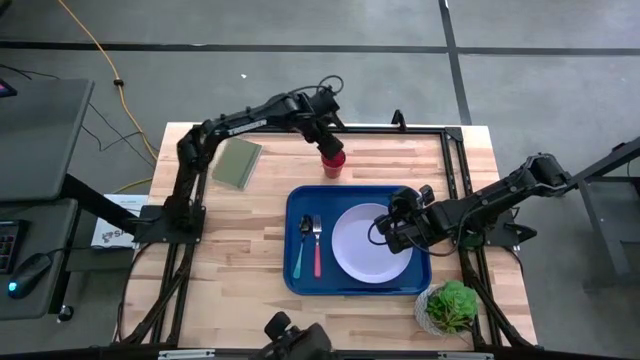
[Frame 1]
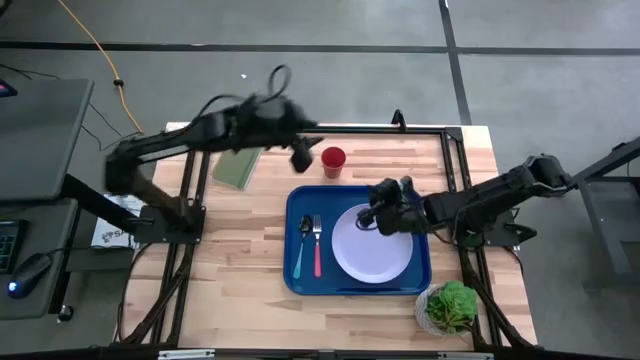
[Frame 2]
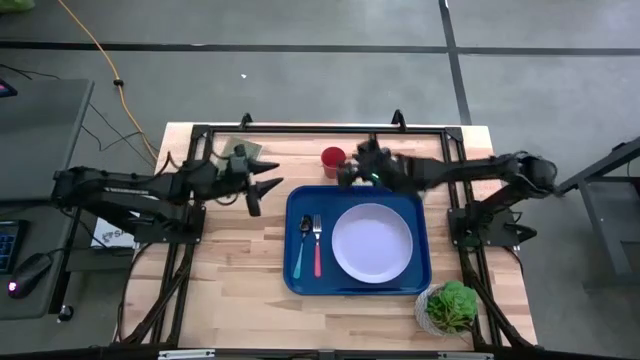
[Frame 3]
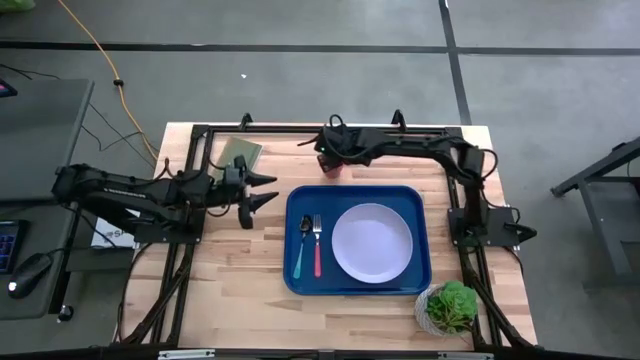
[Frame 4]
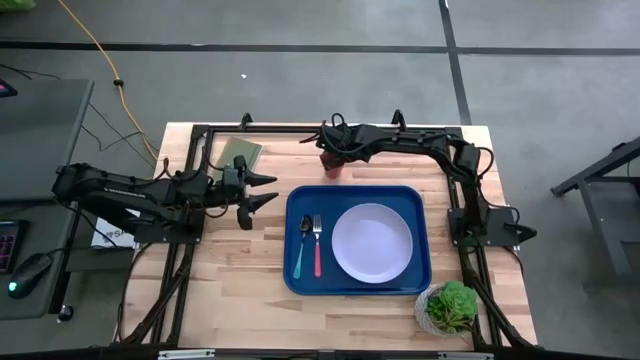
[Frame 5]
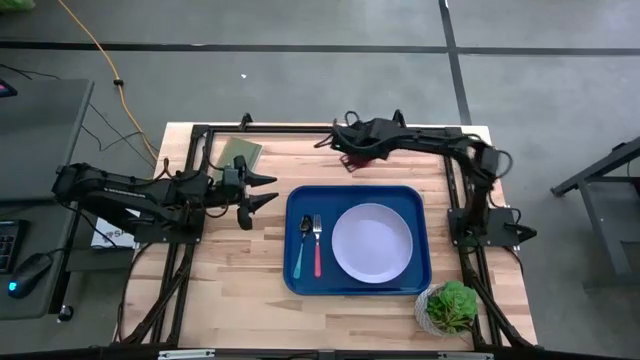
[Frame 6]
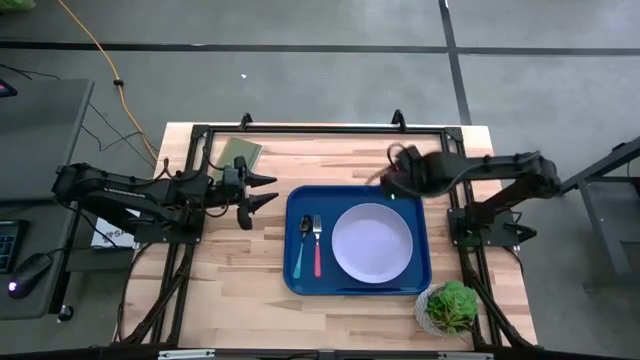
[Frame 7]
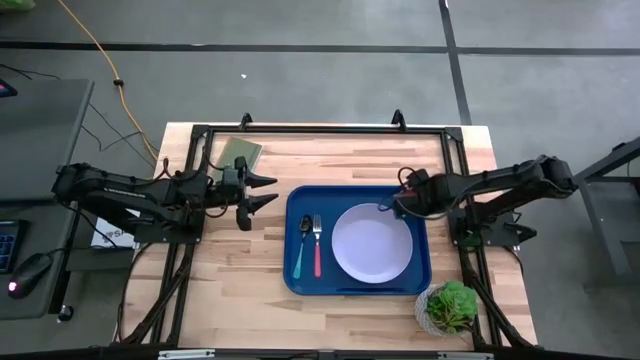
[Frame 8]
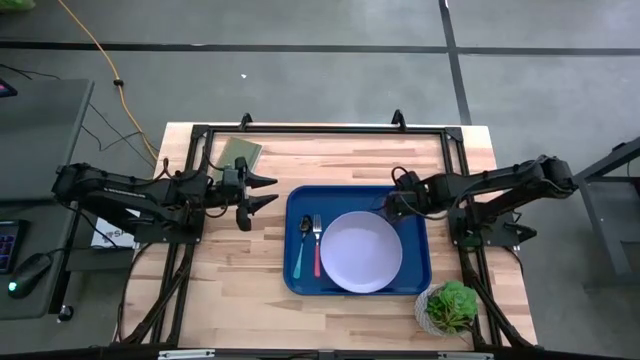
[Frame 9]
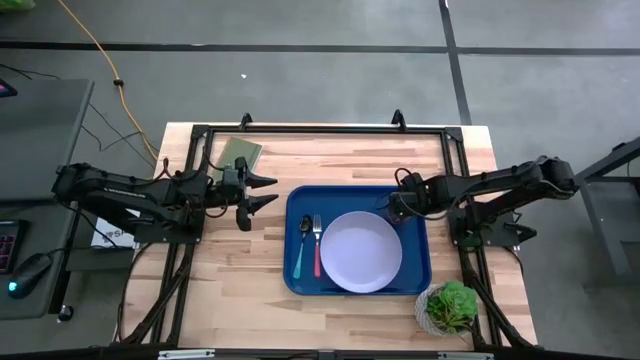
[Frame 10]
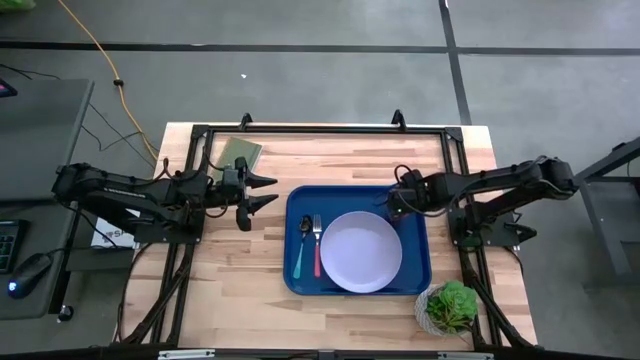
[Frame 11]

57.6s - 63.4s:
Task: Pick and place plate/cup/fork/spoon on tray
Put the orange cup on the blue tray

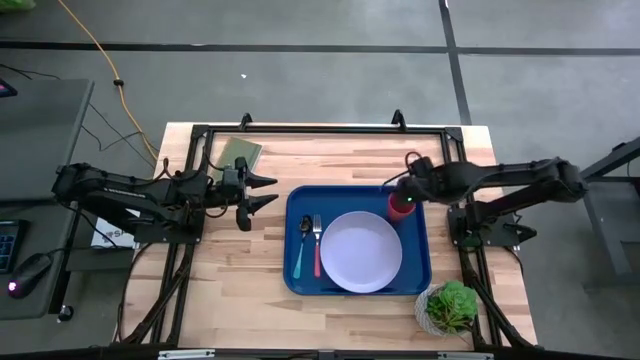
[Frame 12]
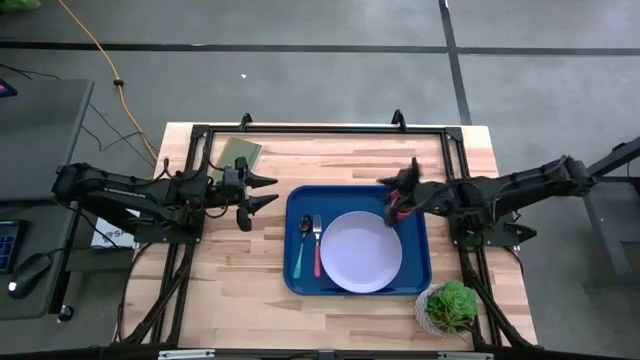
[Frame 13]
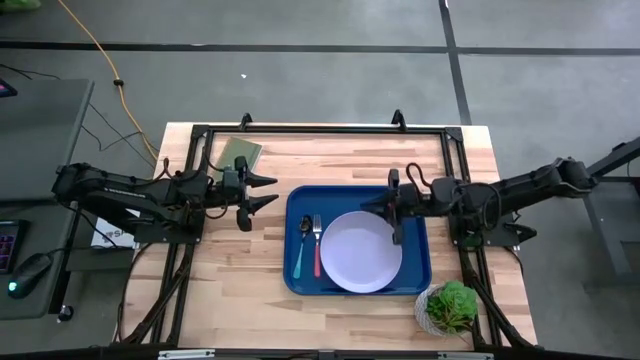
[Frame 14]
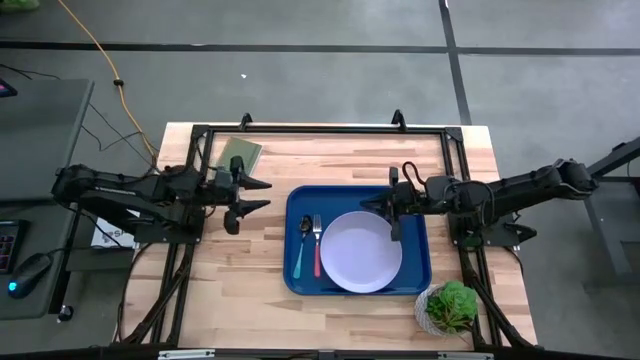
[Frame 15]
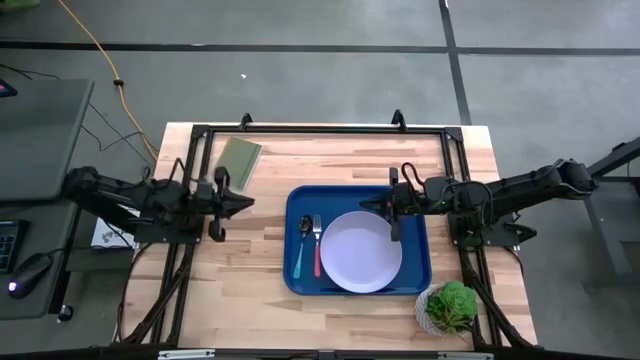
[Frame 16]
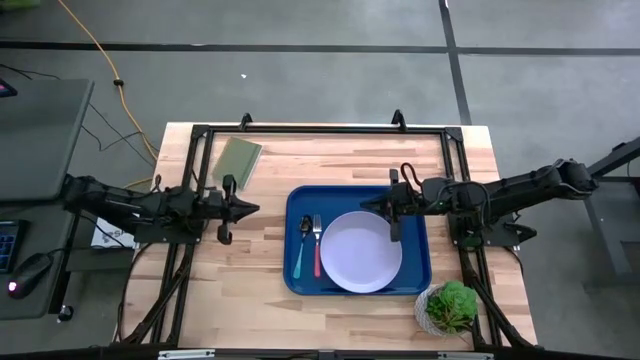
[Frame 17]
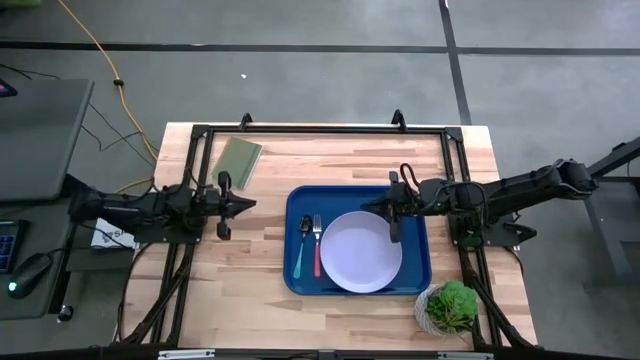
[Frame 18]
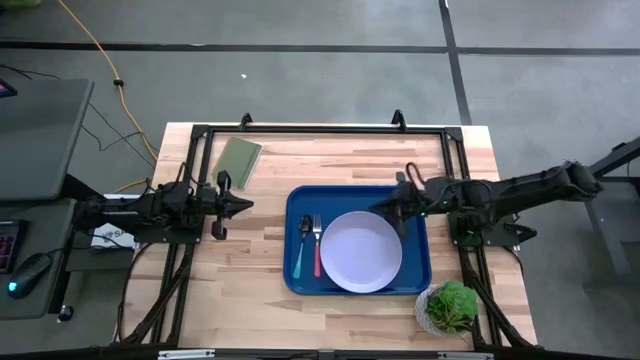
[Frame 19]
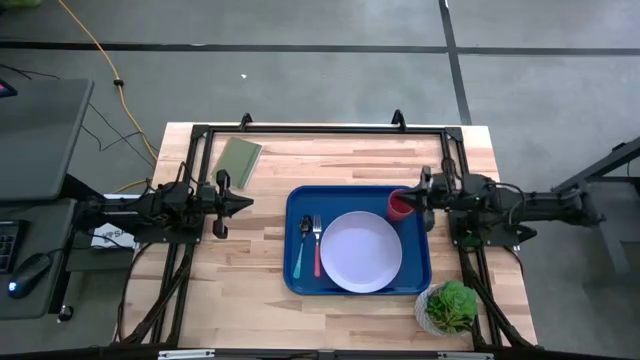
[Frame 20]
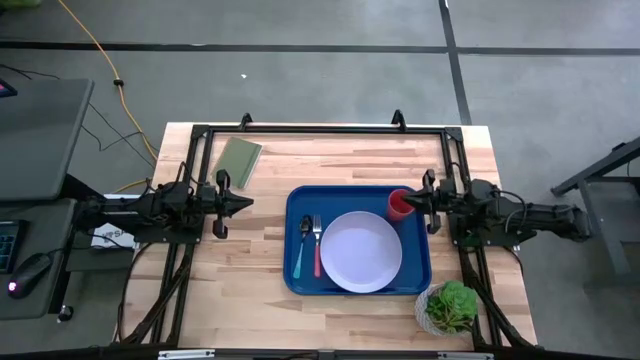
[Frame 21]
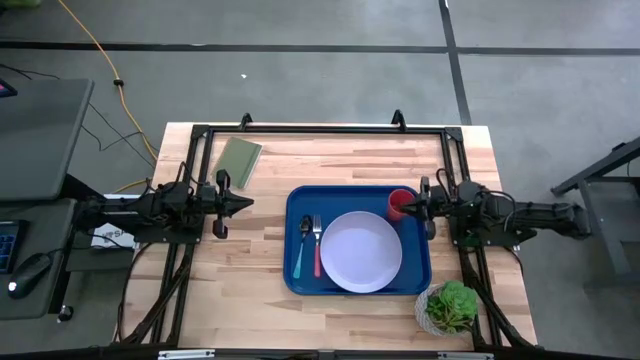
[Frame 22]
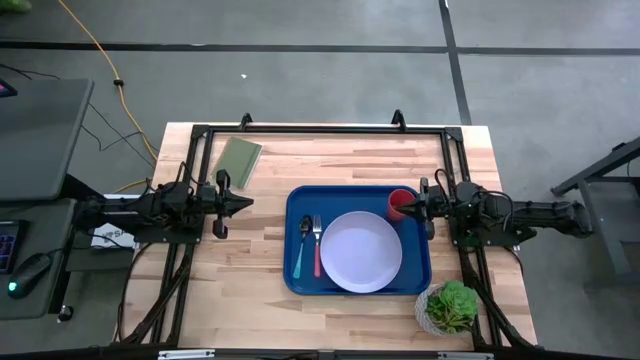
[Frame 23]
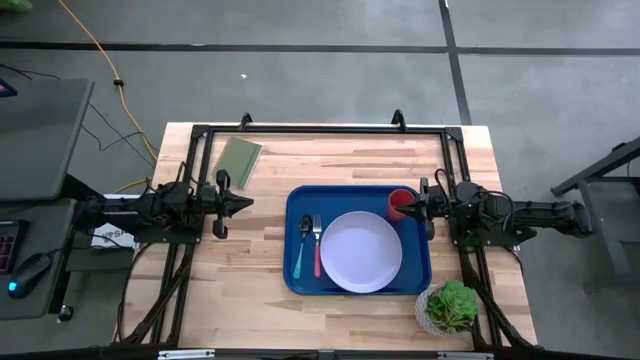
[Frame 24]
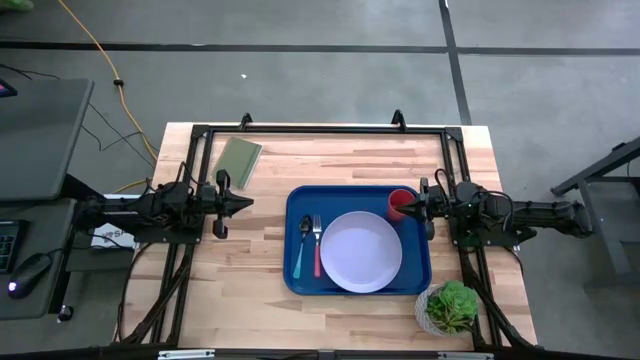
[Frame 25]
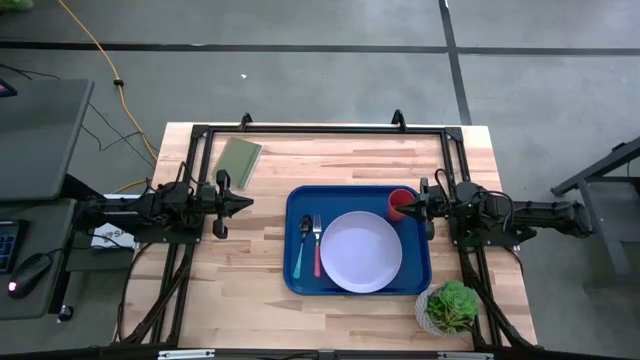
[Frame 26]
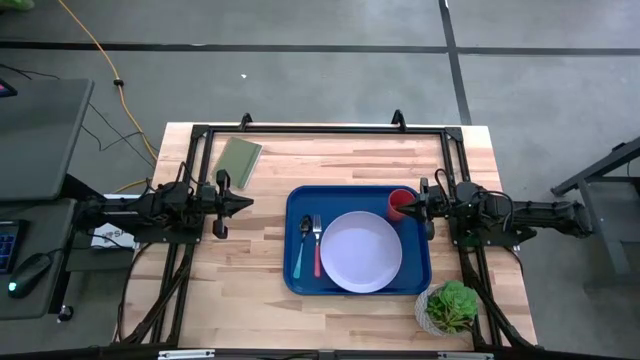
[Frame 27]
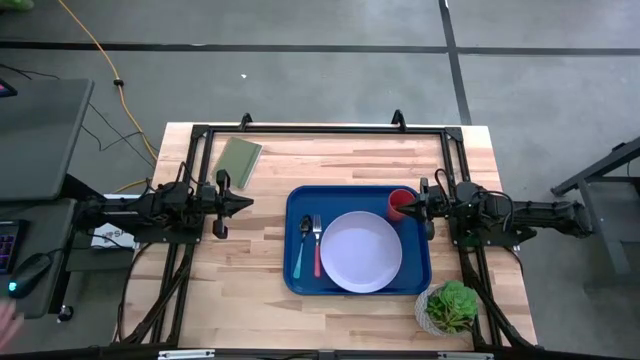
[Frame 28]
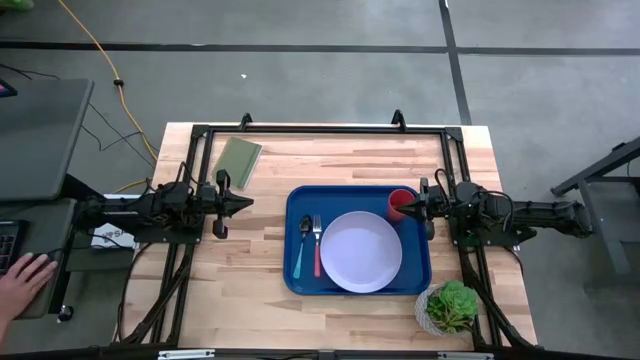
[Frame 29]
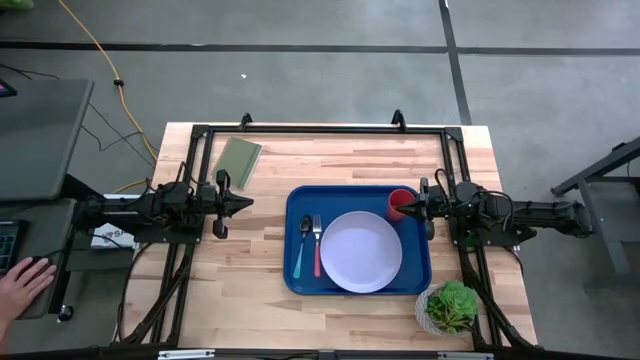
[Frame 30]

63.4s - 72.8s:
Return to Home Position

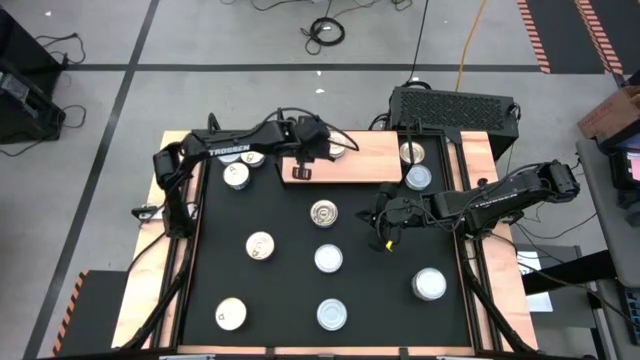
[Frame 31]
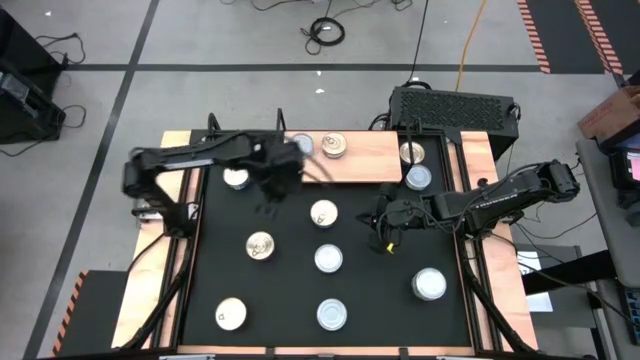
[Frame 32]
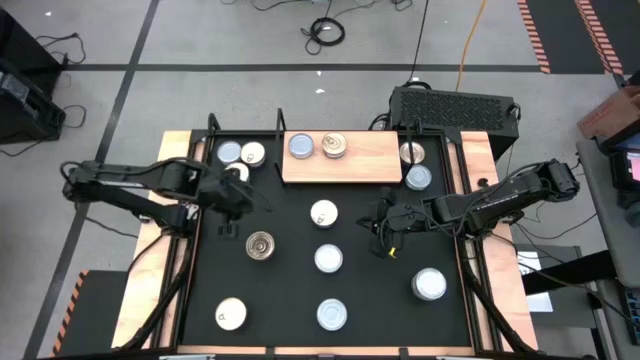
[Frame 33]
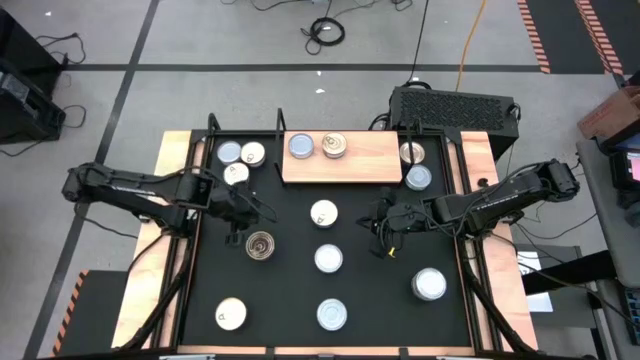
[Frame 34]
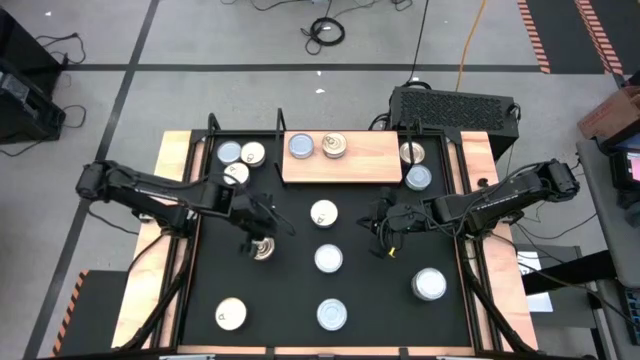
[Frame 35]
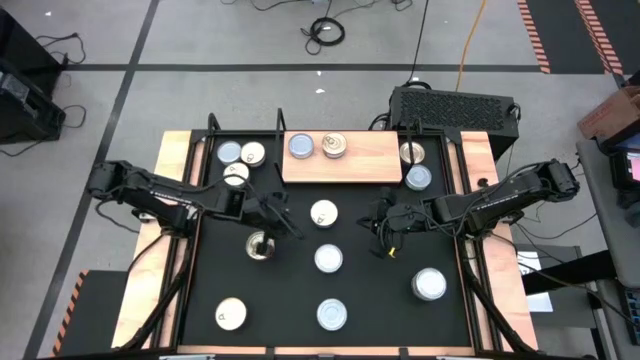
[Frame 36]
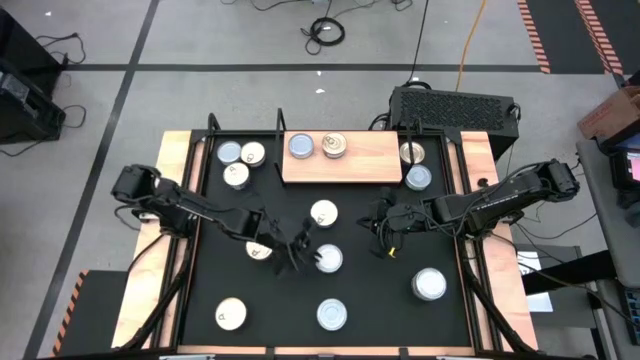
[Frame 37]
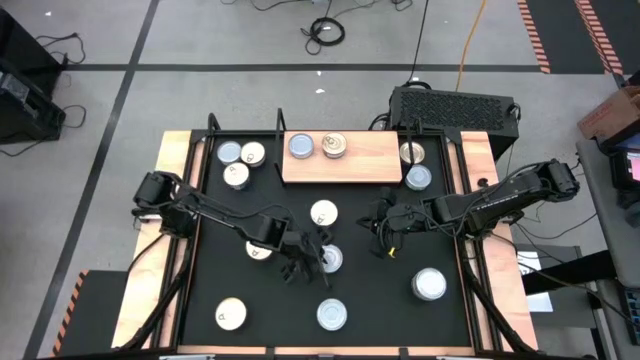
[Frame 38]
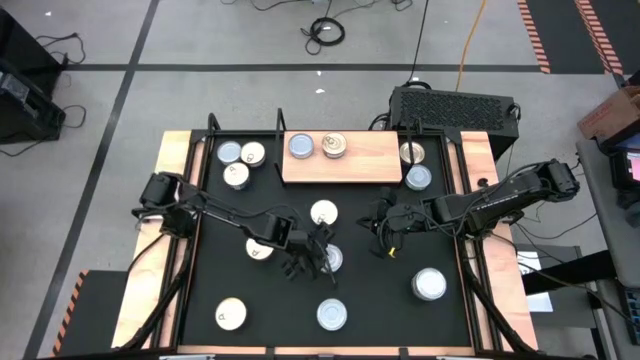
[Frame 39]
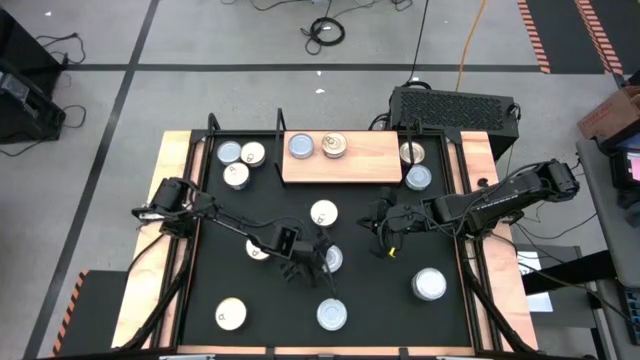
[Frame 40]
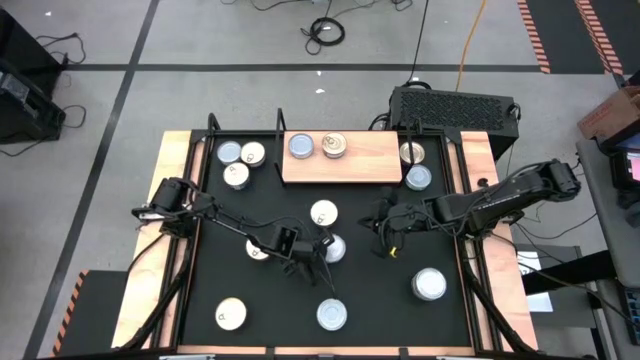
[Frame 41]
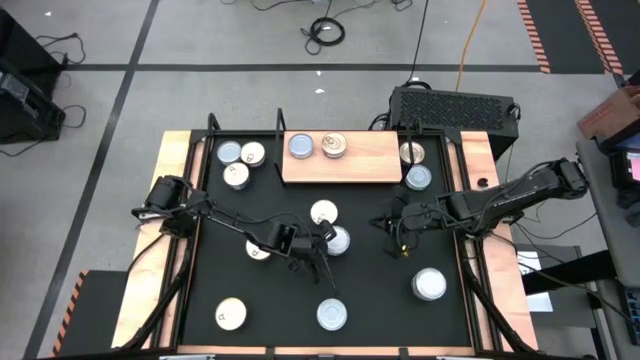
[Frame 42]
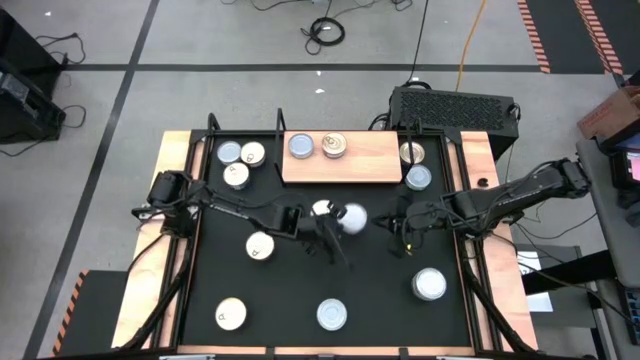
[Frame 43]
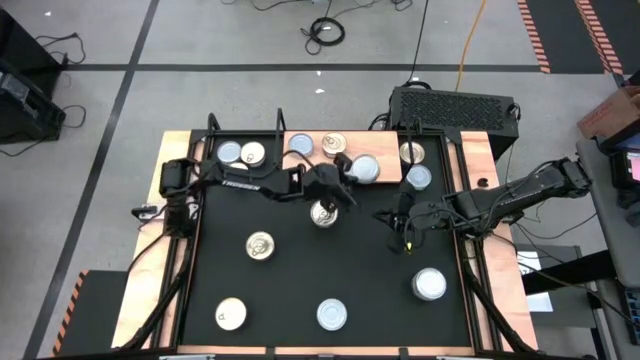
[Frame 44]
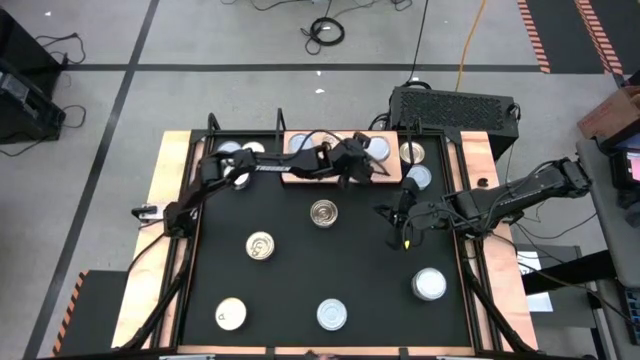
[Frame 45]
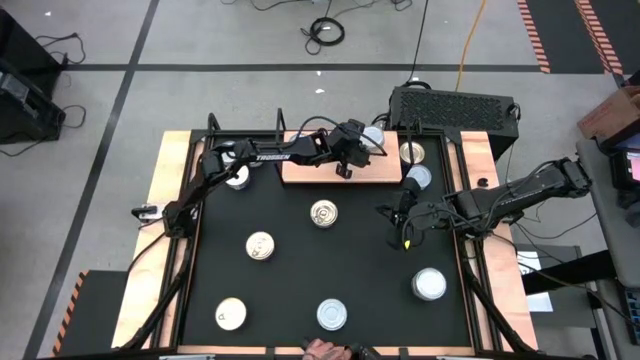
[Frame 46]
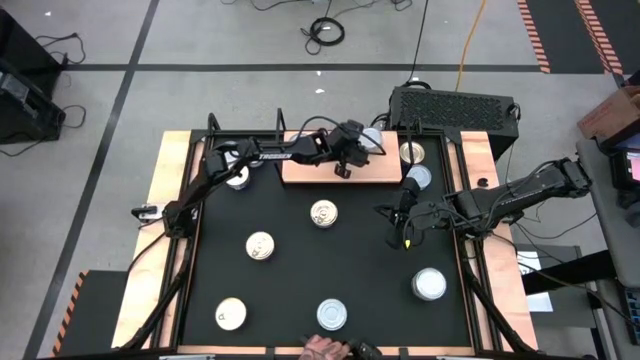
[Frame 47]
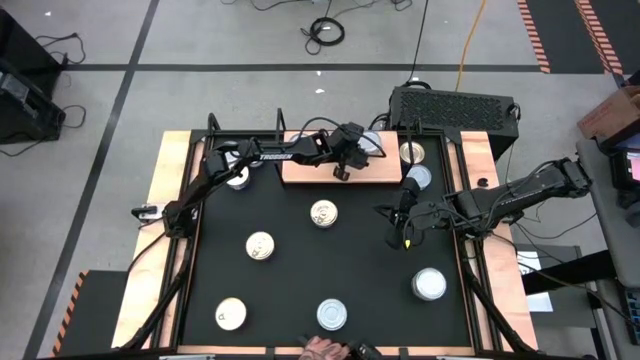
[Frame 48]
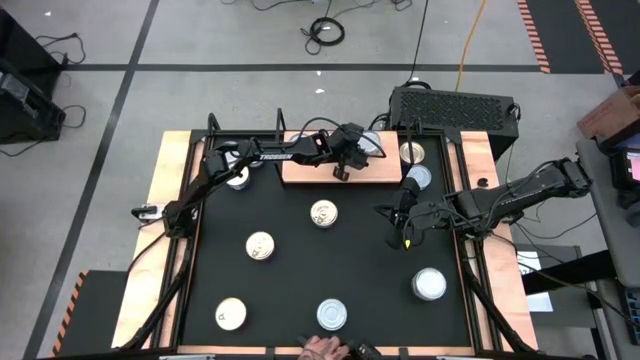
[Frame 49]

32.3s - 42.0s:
Task: Stack canned seafood by type on shelf
Put the center green tuna can on the shelf
